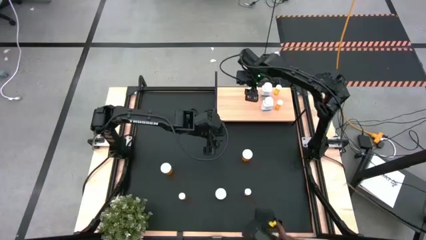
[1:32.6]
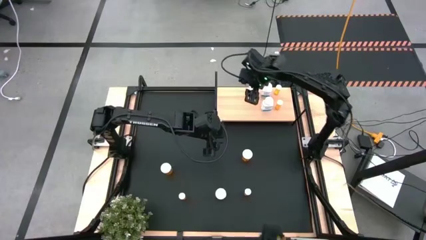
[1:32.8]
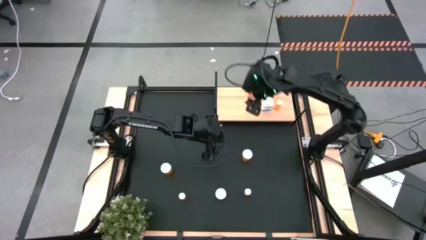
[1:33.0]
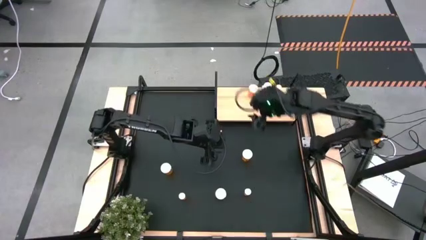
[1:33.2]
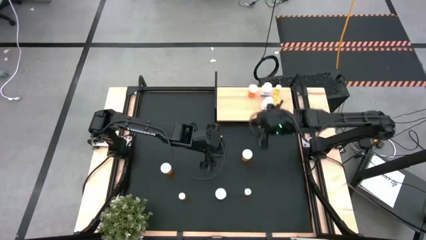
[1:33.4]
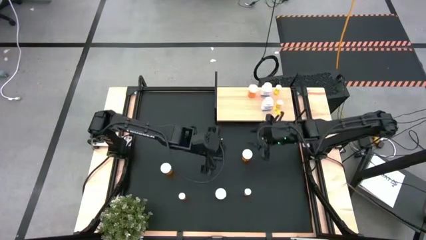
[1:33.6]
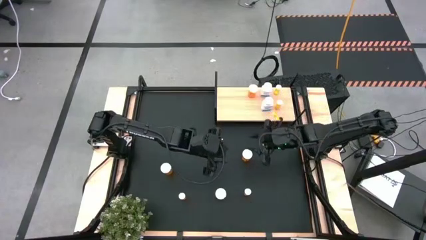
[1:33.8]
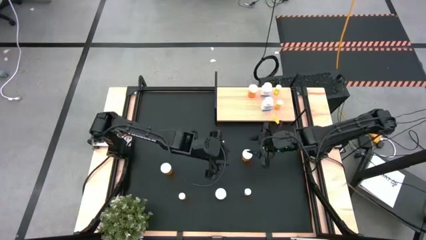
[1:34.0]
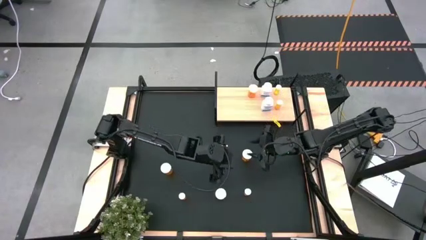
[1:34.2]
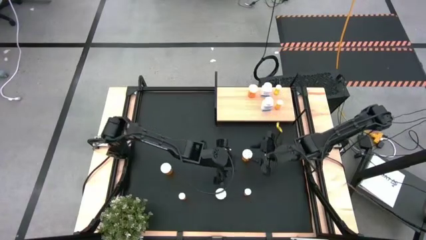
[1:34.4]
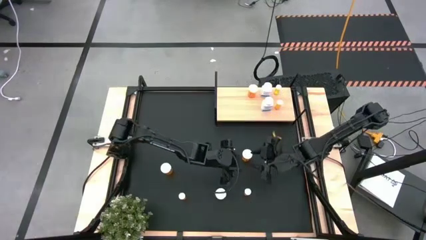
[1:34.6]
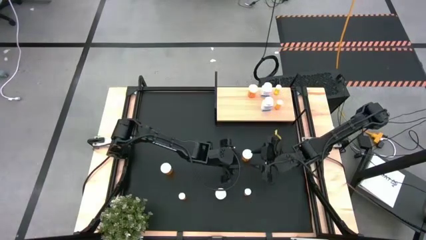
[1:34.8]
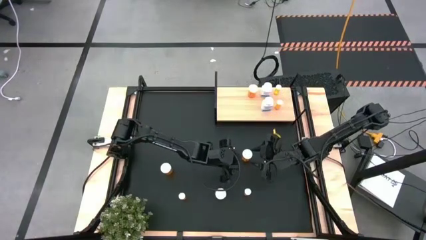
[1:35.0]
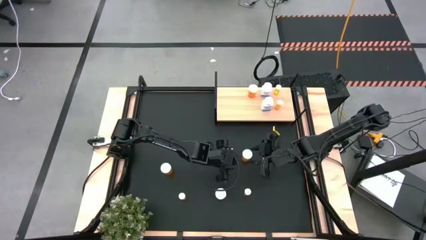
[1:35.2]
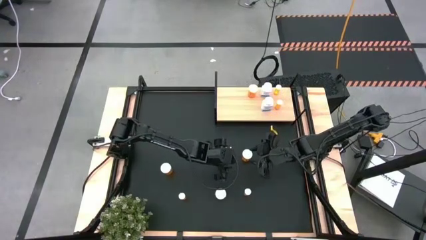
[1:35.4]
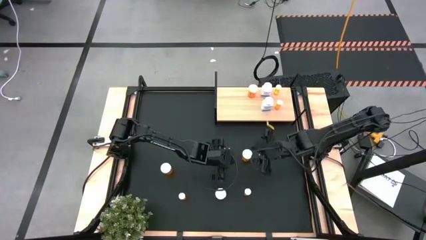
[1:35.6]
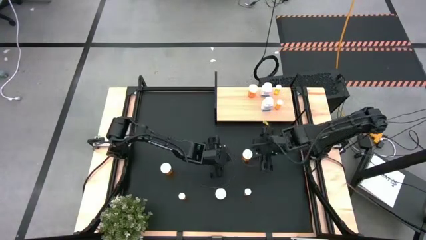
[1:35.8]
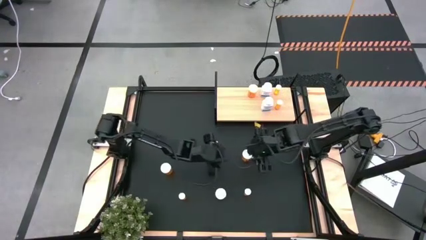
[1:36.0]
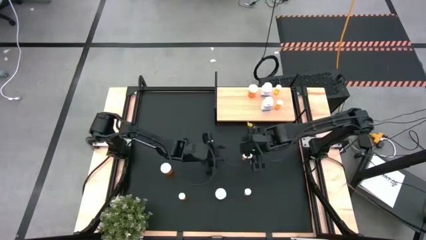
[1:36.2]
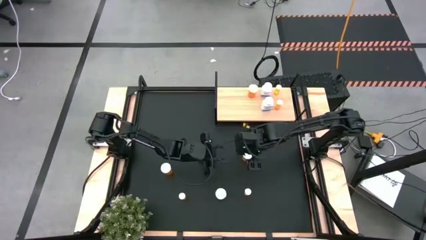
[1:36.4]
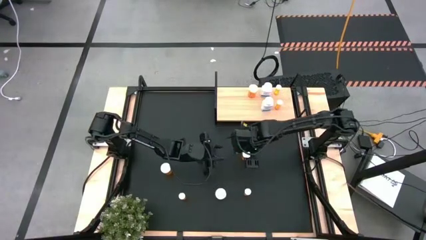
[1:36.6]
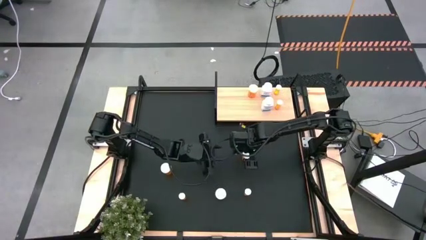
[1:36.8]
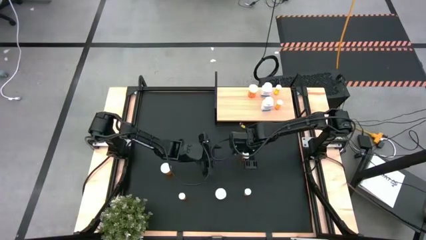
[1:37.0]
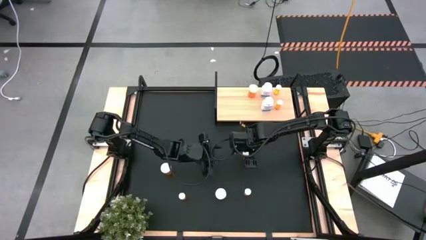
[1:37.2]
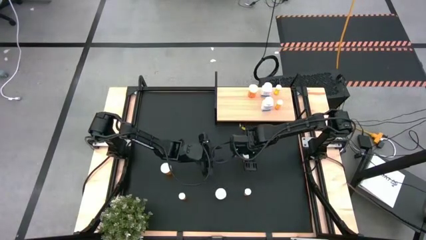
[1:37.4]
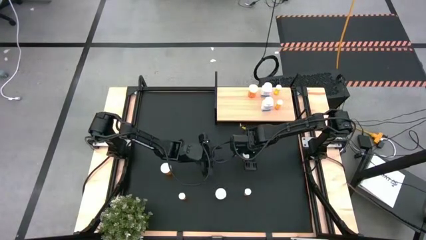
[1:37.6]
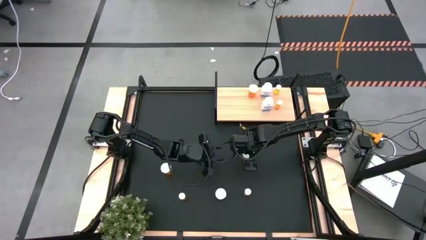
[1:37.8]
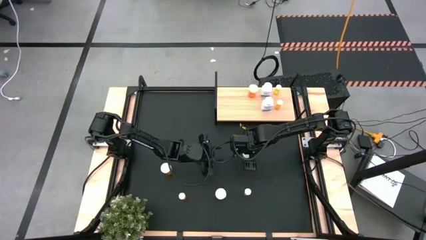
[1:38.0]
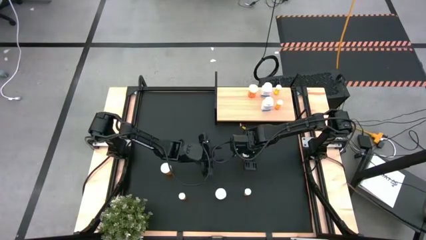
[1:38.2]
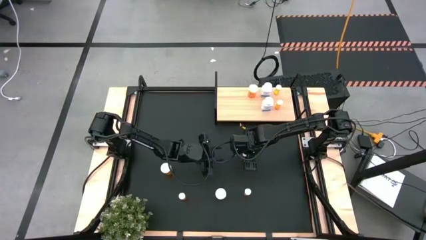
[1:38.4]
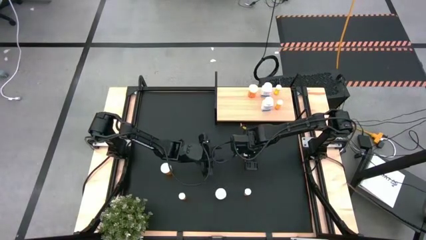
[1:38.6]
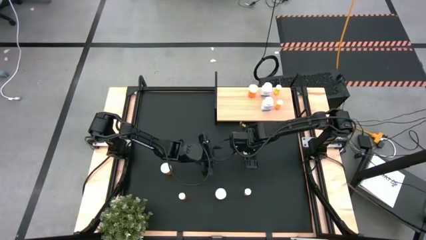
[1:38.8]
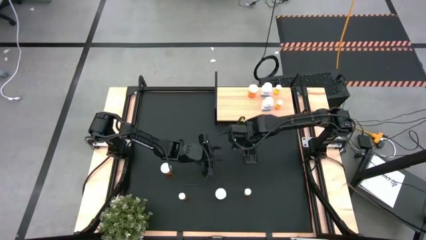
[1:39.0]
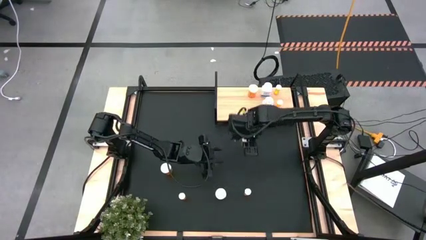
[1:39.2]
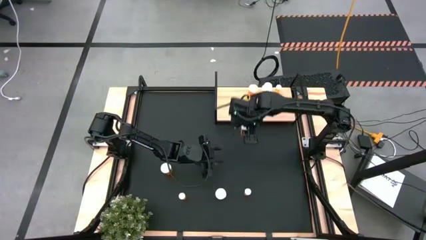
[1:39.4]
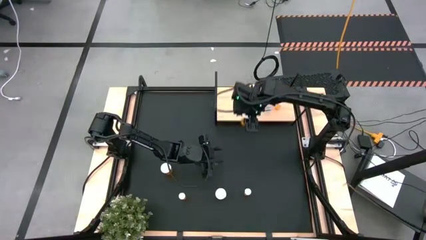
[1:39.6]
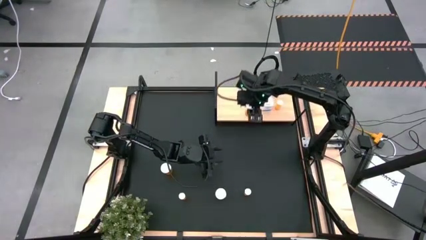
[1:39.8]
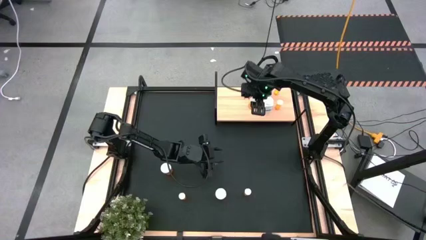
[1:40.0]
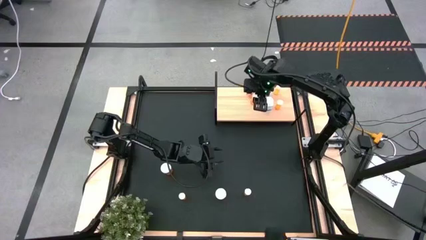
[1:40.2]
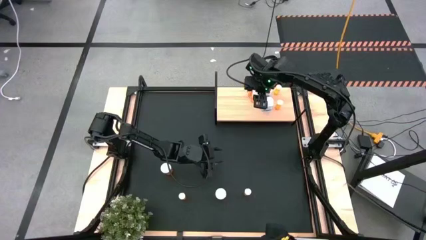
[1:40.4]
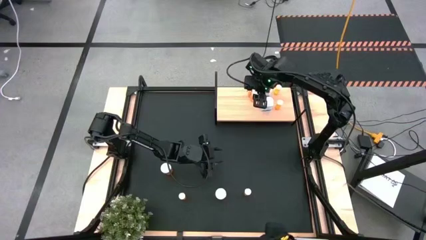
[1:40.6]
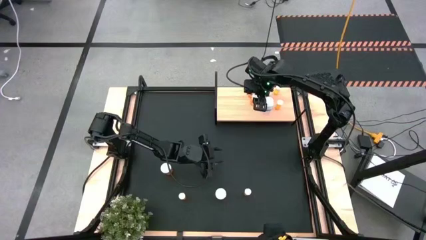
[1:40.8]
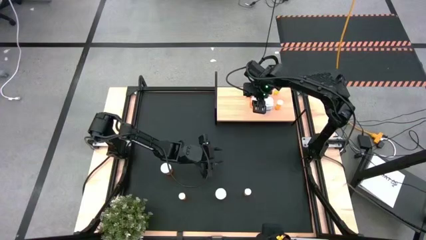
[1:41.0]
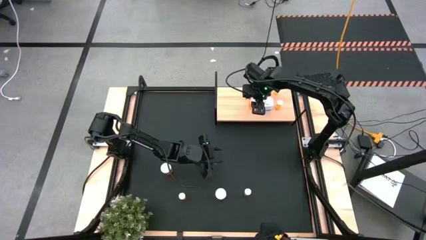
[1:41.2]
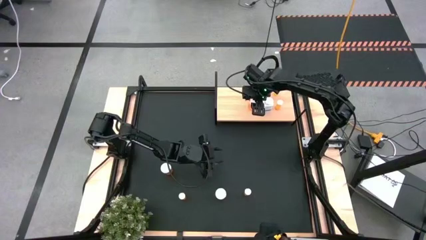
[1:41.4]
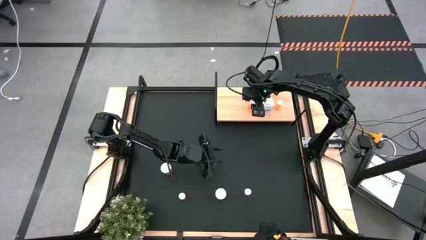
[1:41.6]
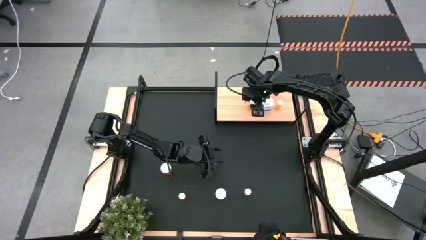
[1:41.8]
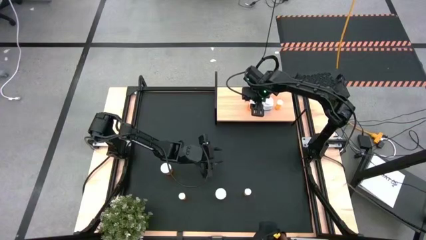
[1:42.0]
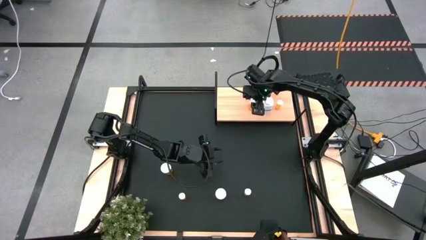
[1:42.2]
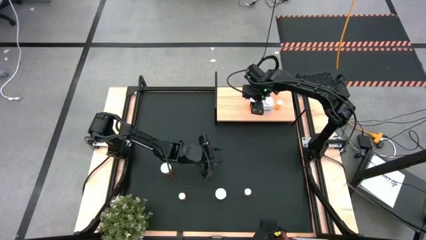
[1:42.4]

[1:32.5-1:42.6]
Task: Pick and place medicine bottles onto shelf by color
Put the large orange pill bottle on the shelf aligned with the other large orange pill bottle

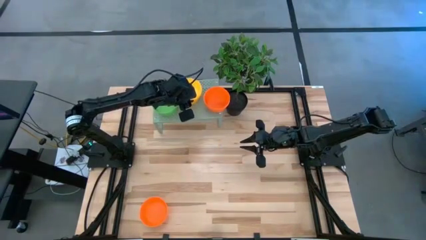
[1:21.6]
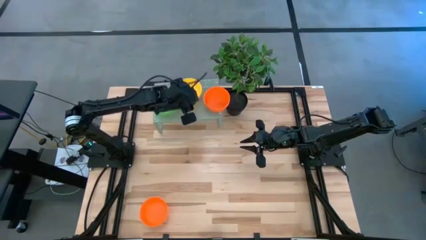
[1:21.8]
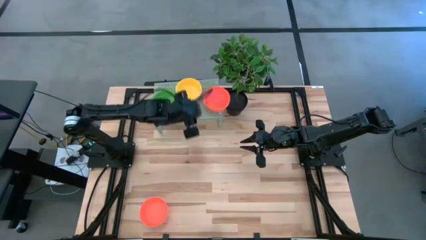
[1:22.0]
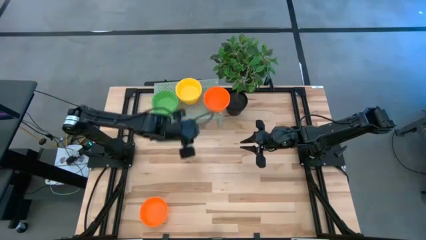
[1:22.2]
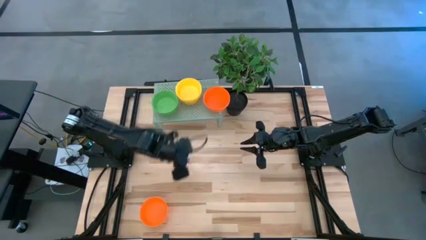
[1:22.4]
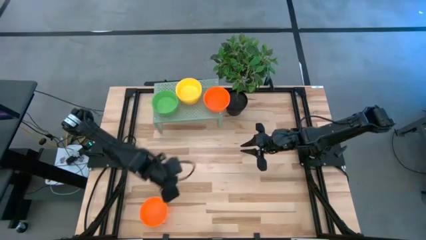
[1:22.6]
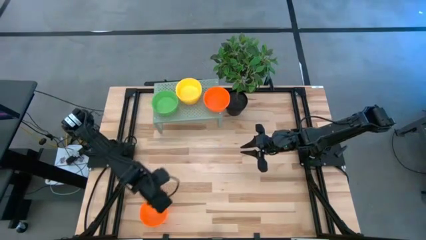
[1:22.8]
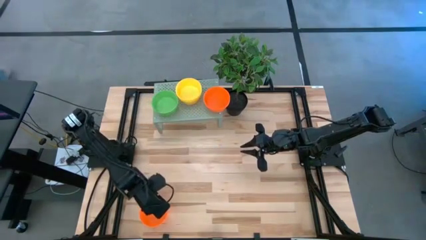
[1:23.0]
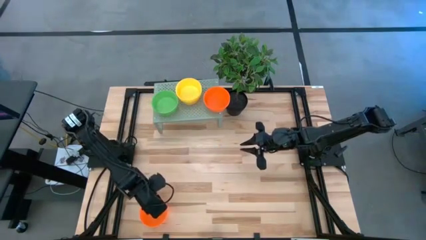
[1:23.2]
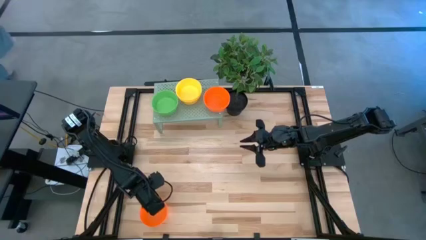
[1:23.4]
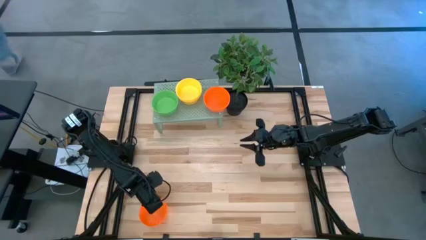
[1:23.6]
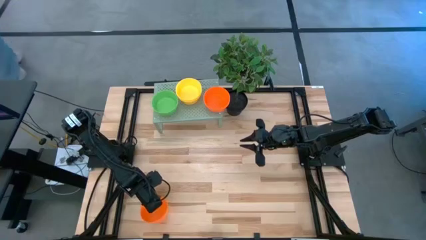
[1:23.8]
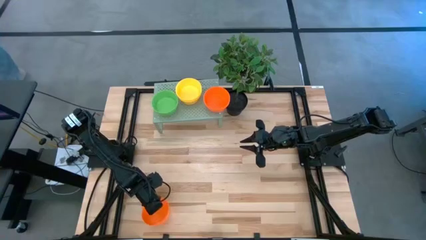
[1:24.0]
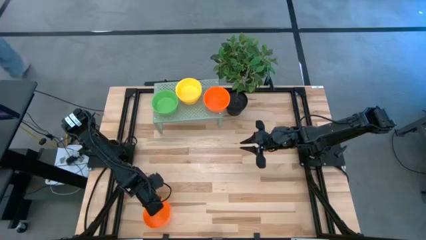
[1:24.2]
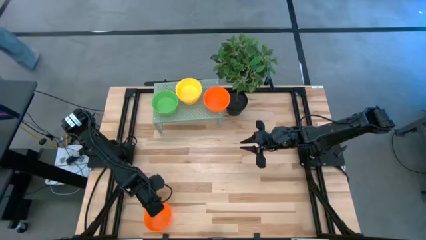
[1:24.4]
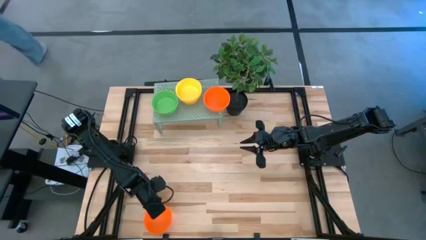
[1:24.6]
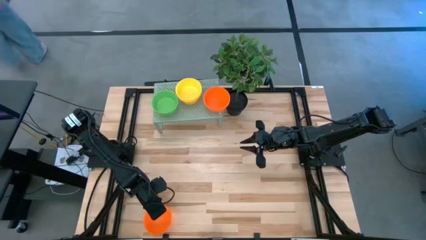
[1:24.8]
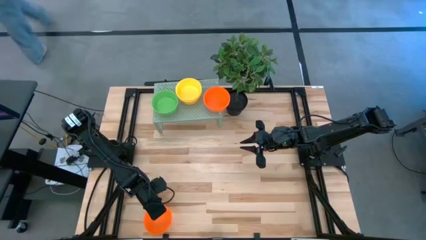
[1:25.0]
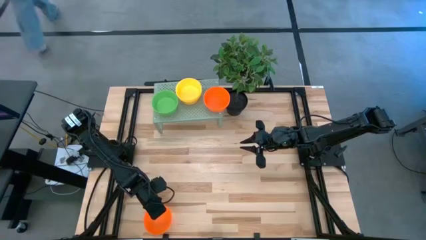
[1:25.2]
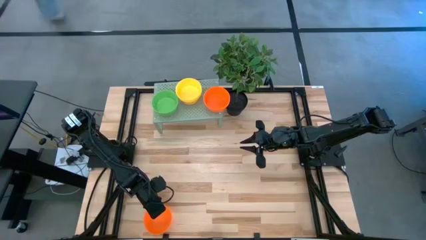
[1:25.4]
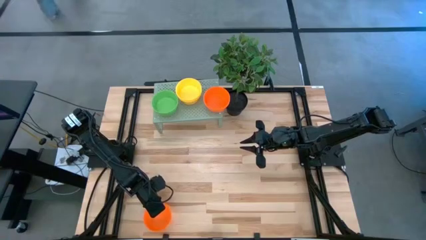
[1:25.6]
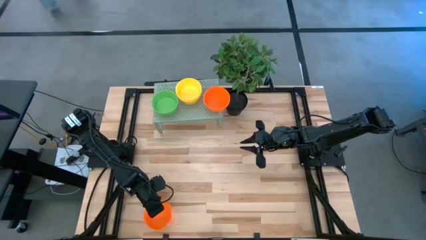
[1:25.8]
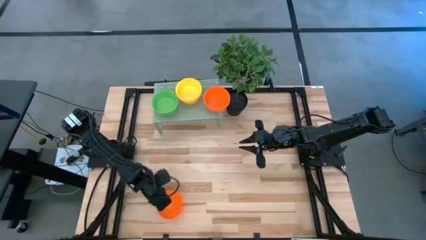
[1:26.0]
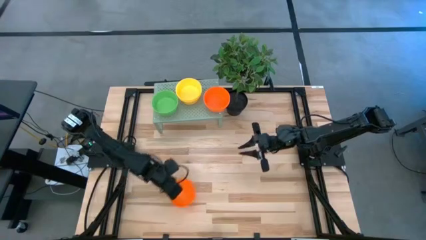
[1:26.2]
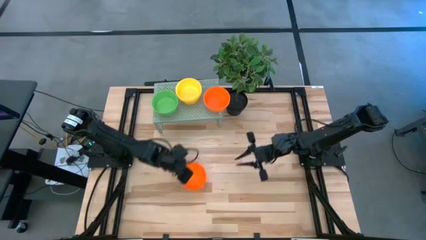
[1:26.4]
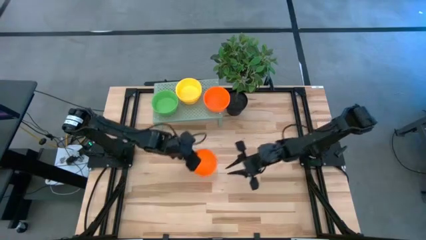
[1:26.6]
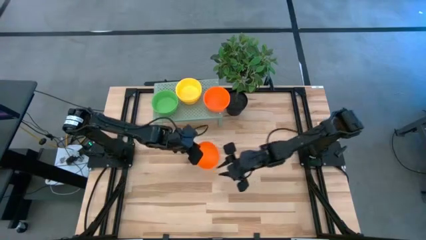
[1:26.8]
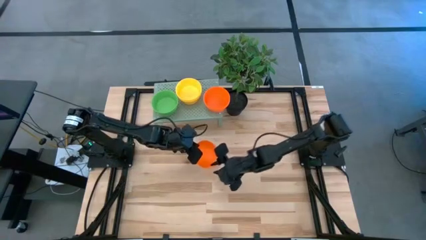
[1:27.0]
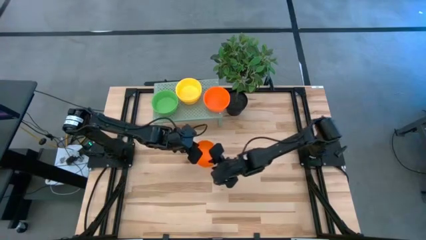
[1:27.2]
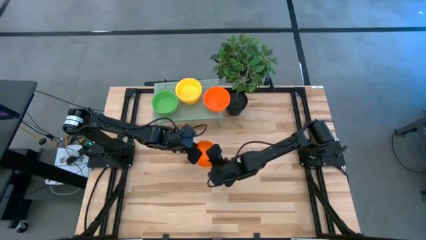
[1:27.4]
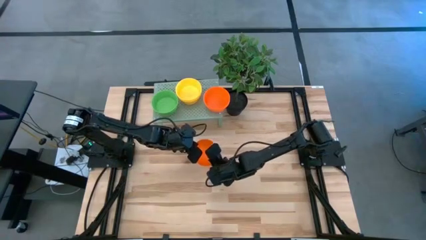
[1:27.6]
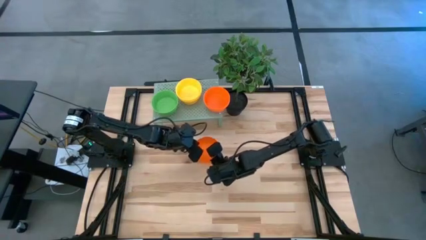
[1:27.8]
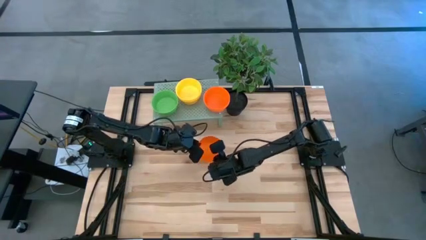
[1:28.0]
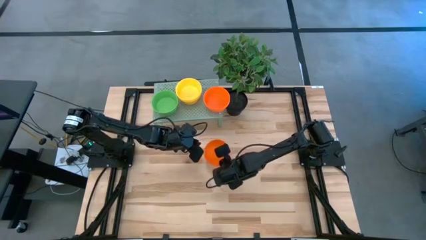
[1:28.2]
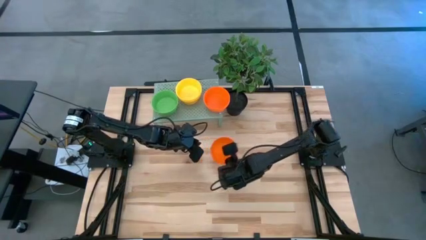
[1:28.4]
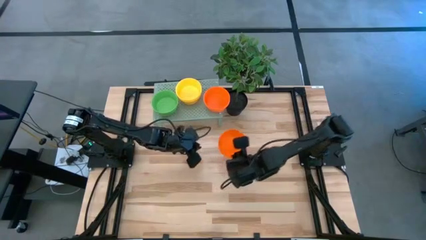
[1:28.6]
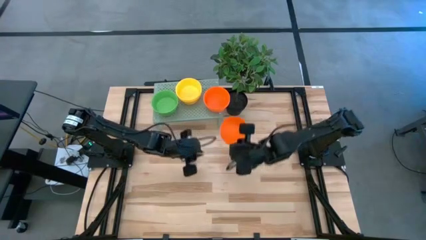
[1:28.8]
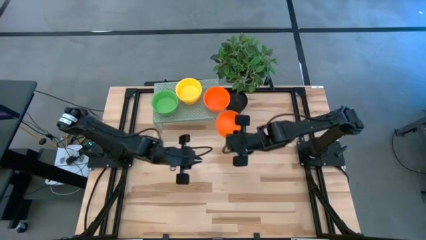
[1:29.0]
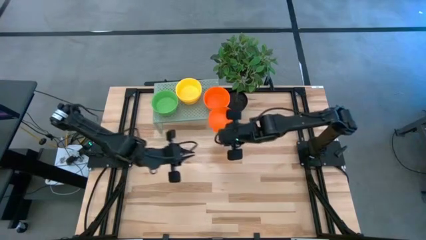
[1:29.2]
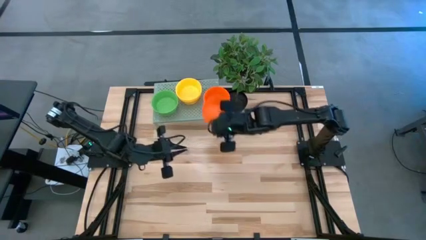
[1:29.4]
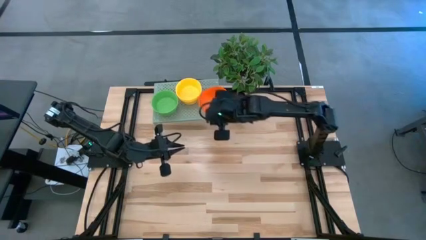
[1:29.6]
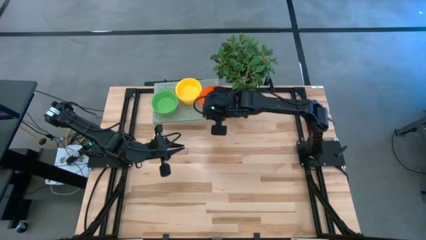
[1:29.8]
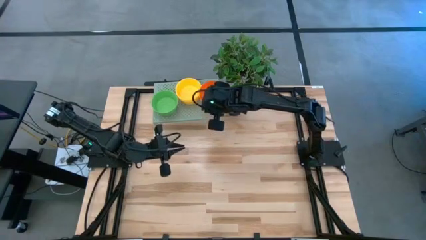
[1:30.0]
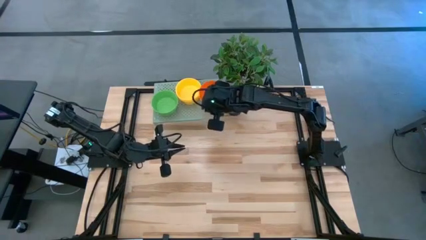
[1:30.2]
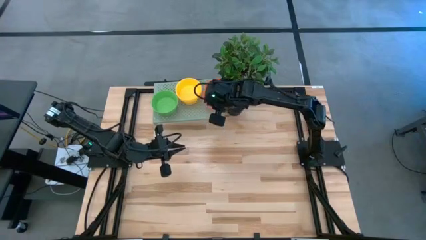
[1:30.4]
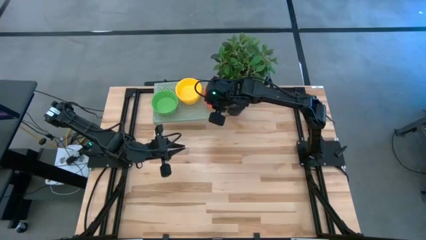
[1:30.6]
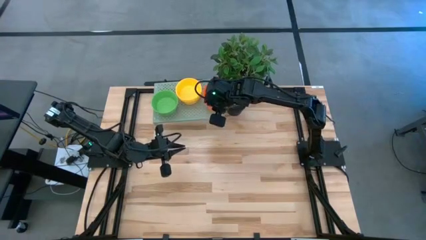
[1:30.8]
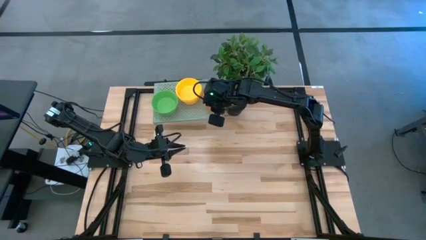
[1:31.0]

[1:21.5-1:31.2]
Task: Pick & Place Mini bowls
Stack the orange bowl on top of the orange bowl on the shelf
